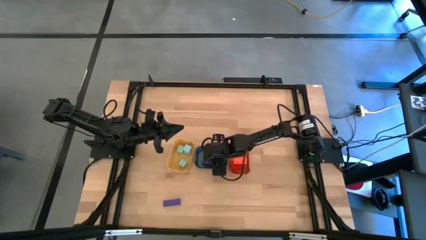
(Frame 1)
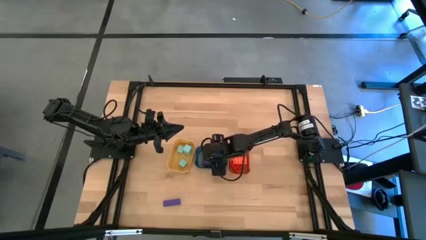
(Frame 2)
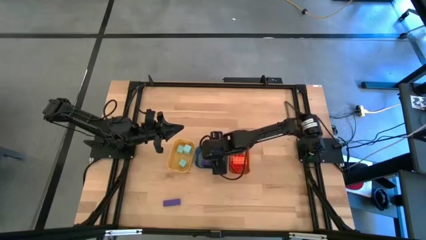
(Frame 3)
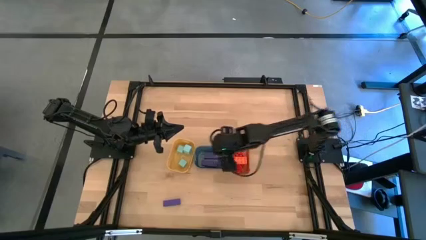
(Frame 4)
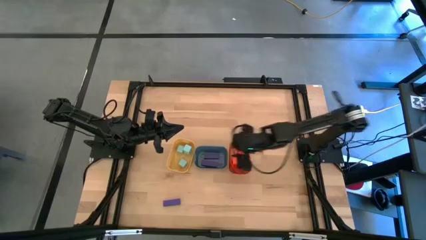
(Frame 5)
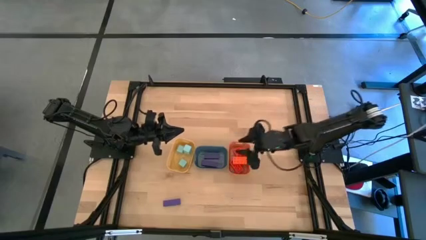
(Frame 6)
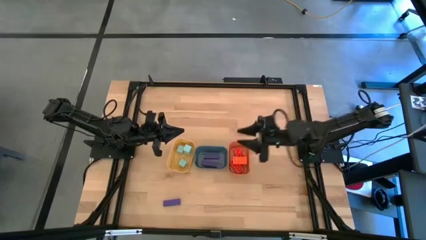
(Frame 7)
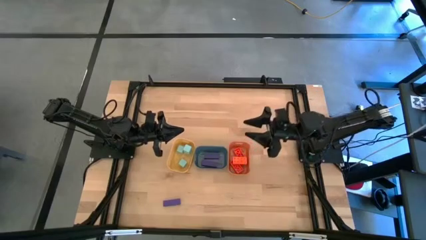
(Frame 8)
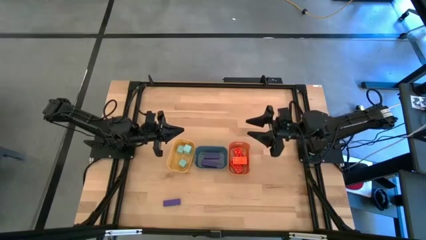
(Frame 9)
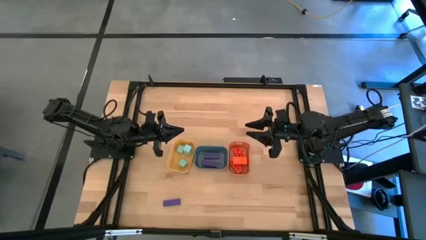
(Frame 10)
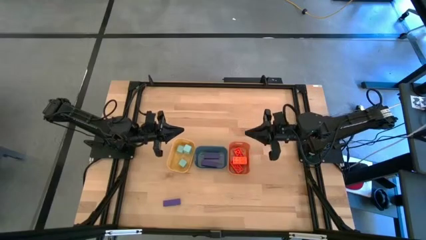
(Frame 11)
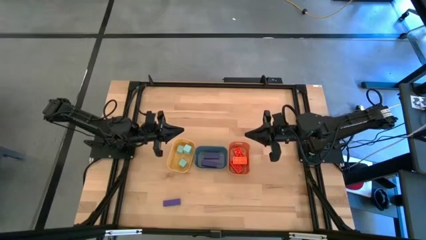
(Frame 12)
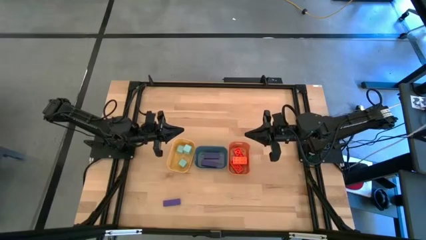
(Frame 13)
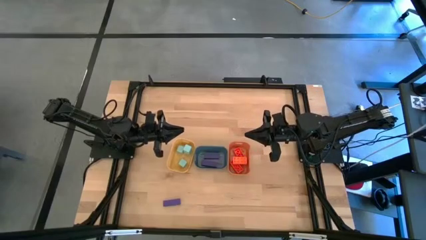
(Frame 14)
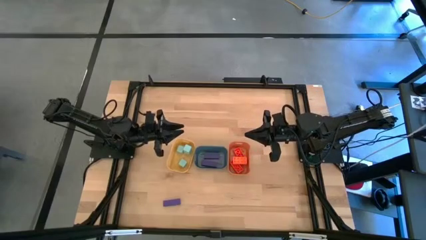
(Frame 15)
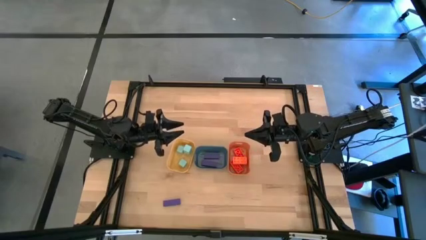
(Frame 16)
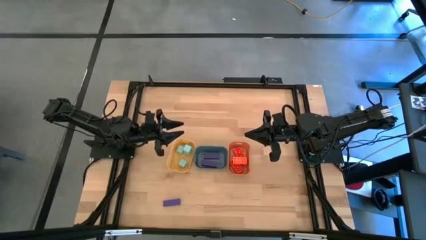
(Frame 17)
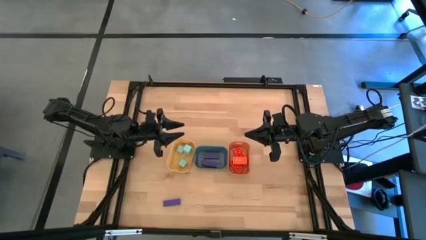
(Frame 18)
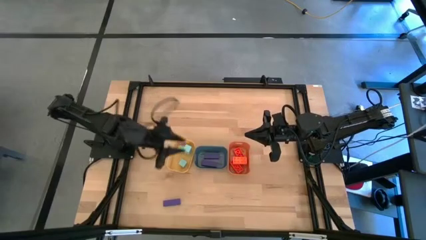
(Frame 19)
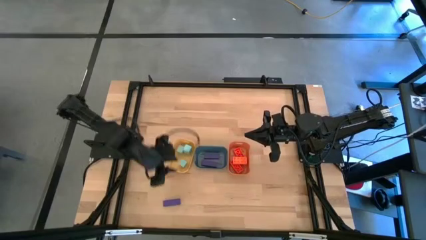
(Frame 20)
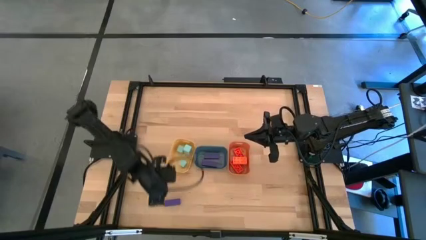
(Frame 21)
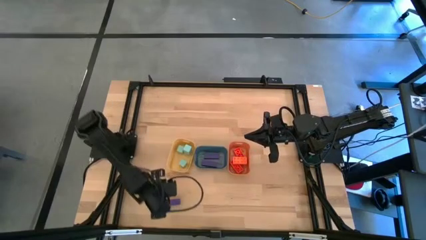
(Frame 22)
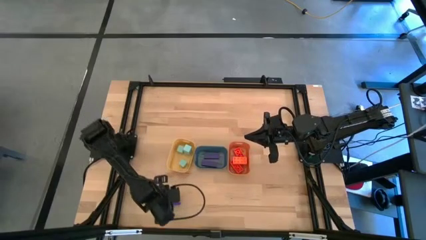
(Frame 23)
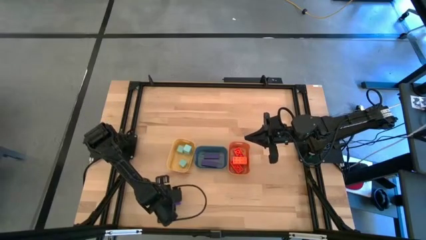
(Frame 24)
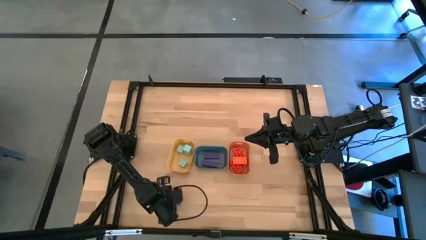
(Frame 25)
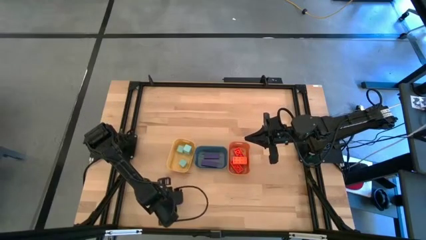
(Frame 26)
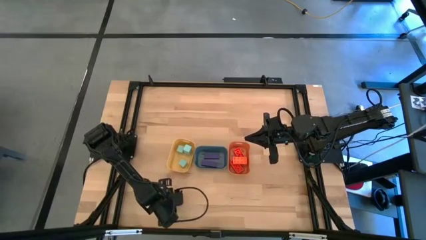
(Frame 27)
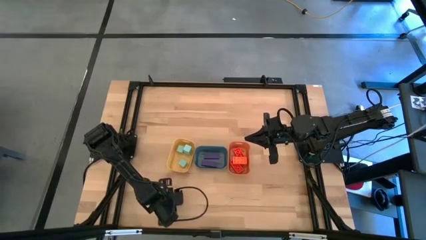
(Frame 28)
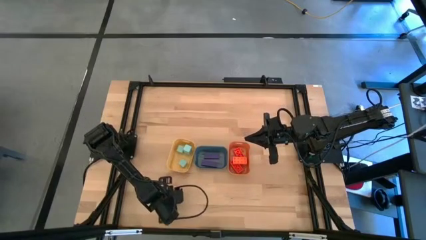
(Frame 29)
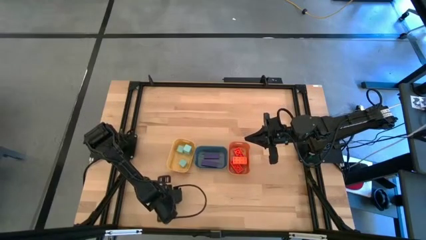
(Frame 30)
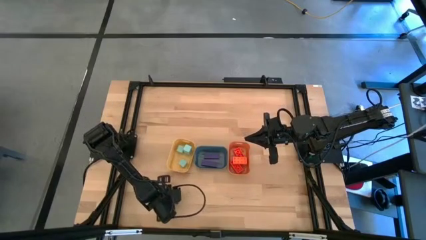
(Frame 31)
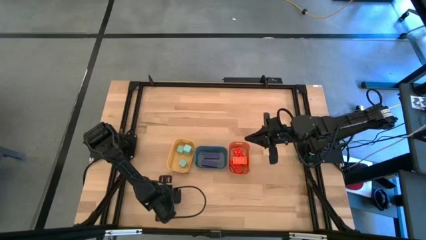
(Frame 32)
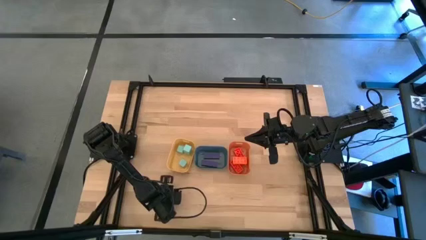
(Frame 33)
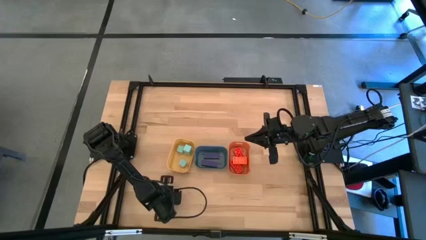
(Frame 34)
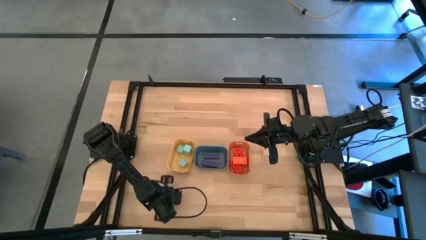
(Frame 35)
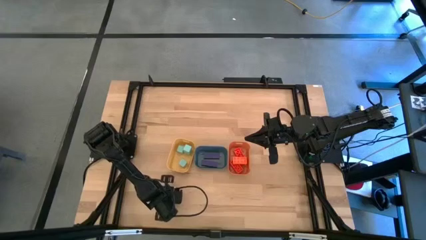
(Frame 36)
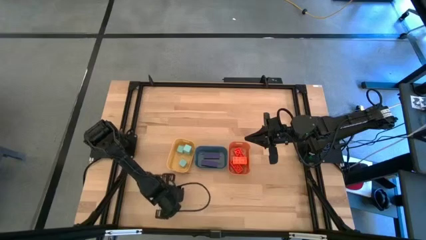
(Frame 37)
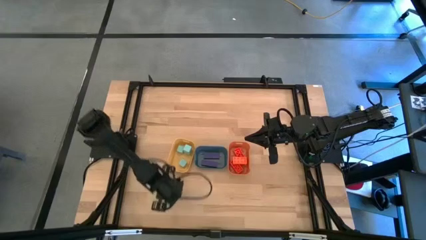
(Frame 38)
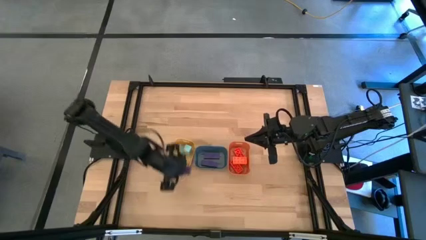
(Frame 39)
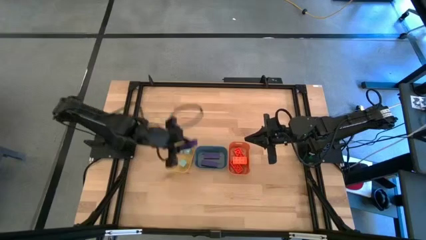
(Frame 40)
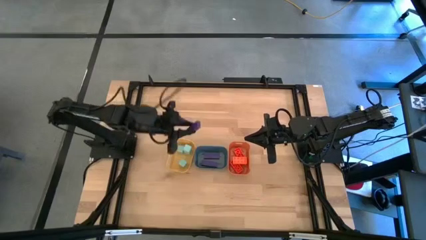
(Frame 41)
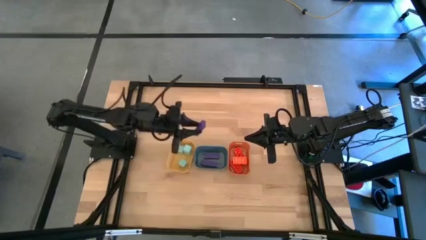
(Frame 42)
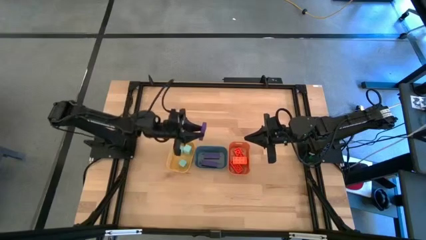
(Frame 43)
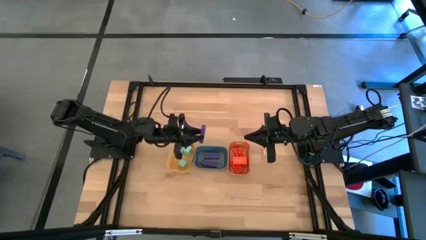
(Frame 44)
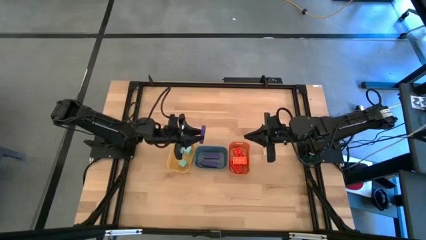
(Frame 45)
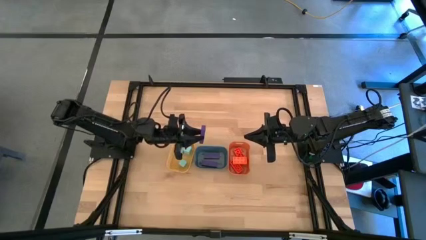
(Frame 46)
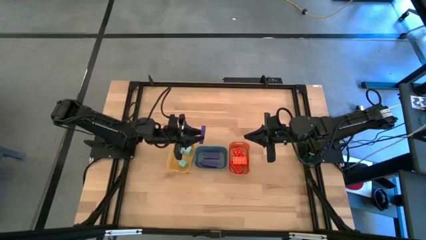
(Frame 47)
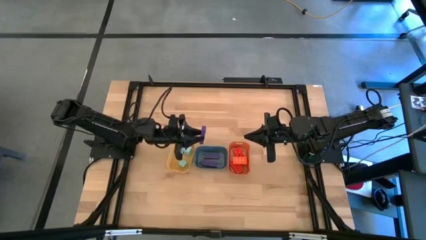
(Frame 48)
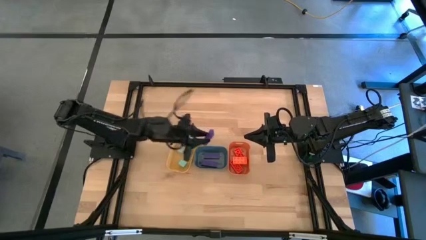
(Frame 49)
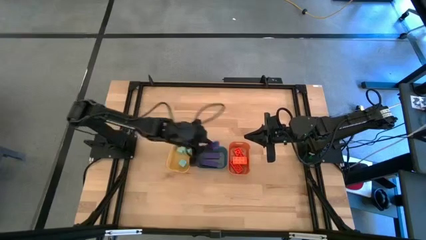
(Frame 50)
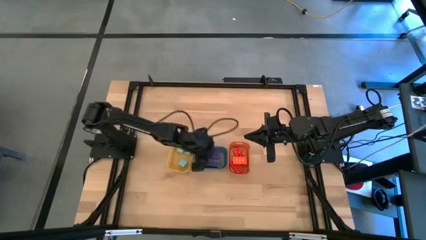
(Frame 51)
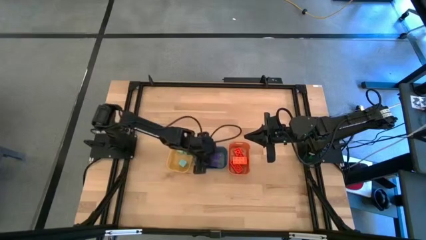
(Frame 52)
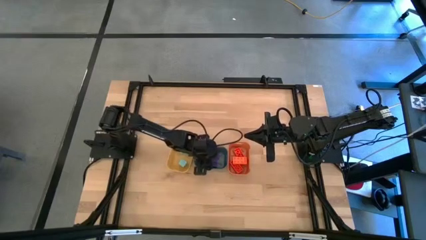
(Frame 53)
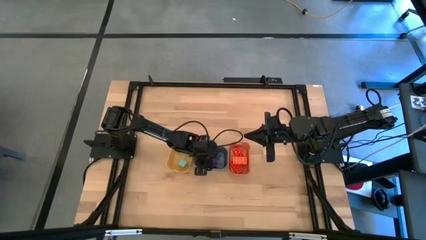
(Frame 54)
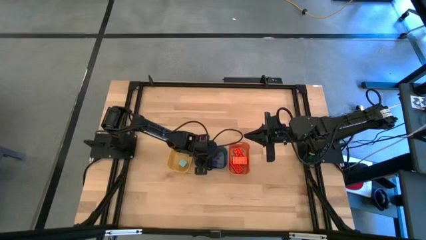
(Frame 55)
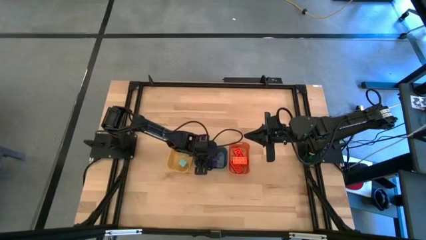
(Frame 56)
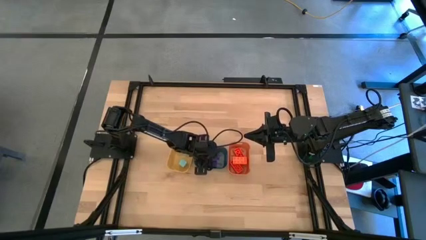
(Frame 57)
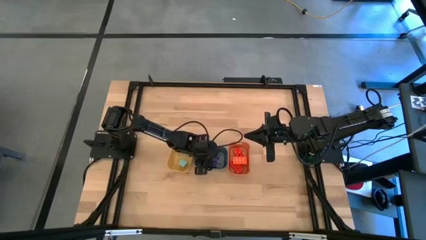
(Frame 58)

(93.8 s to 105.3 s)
Task: Sort & place blocks by color
Put the violet block into the blue bin

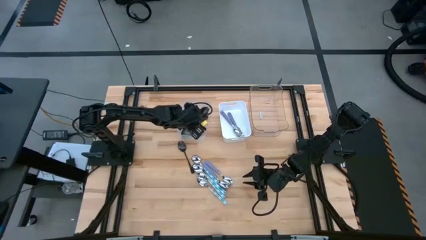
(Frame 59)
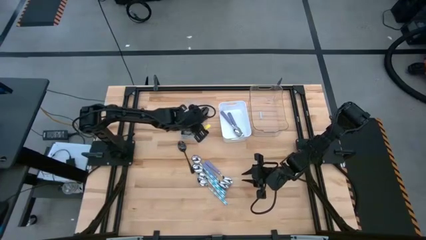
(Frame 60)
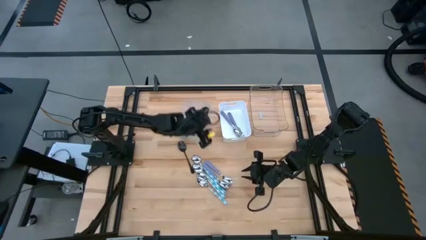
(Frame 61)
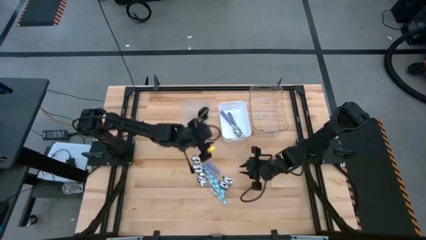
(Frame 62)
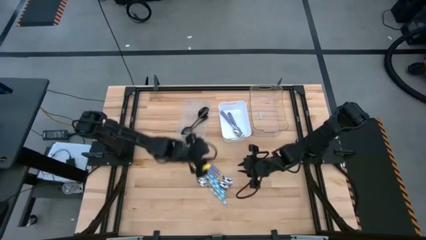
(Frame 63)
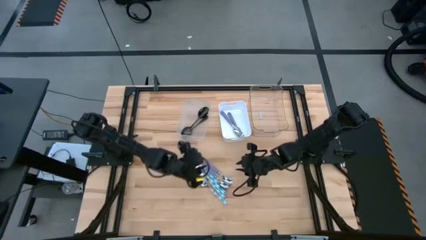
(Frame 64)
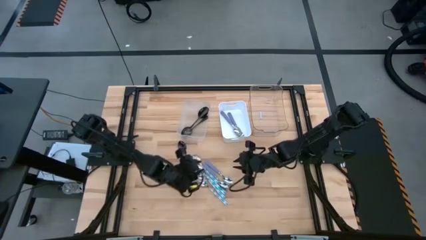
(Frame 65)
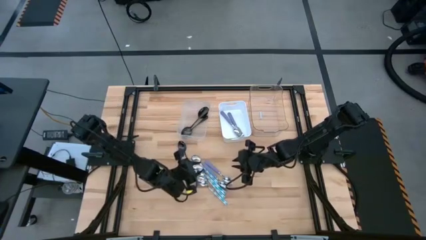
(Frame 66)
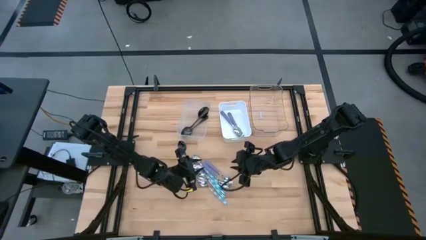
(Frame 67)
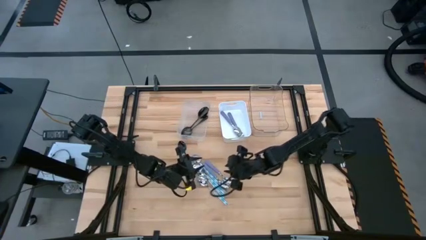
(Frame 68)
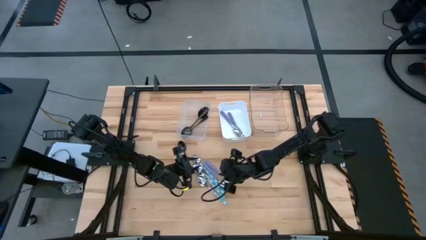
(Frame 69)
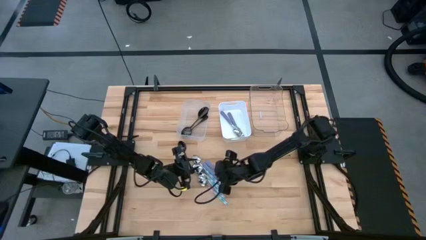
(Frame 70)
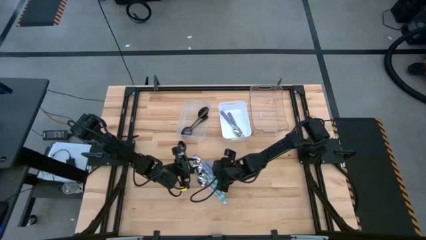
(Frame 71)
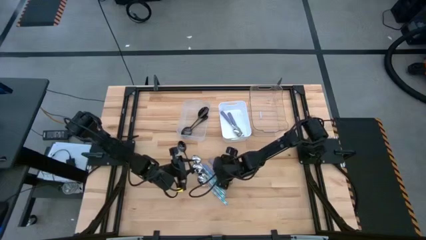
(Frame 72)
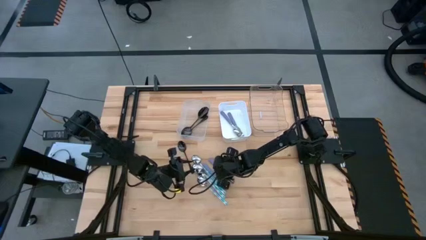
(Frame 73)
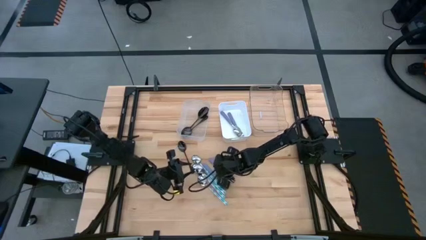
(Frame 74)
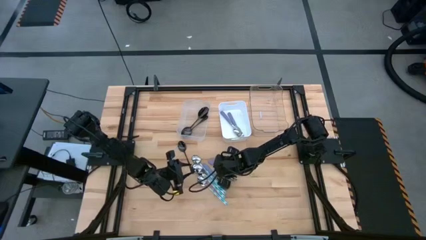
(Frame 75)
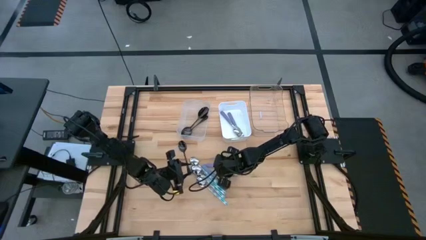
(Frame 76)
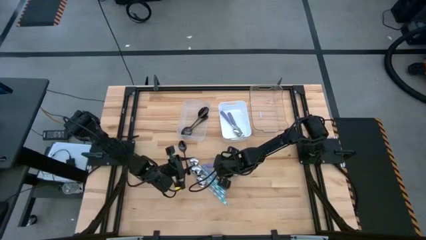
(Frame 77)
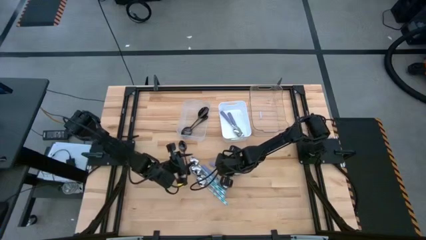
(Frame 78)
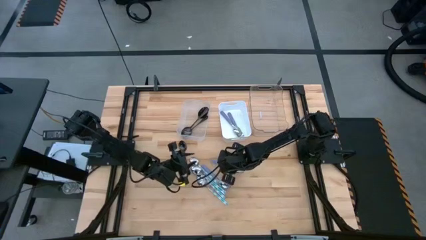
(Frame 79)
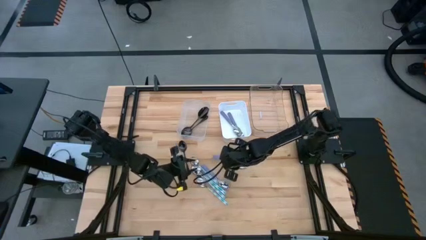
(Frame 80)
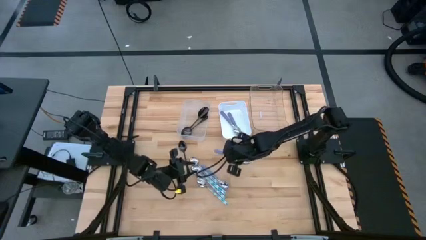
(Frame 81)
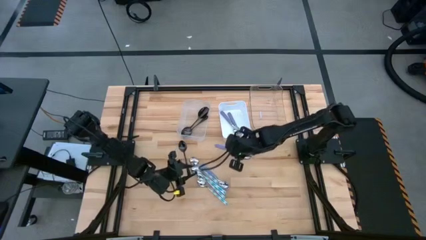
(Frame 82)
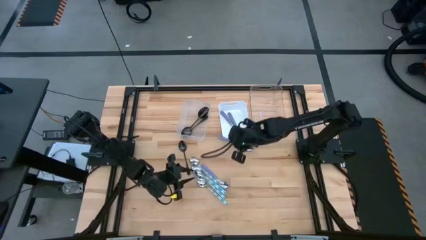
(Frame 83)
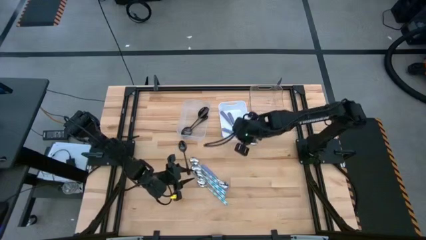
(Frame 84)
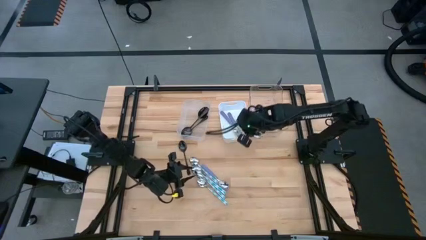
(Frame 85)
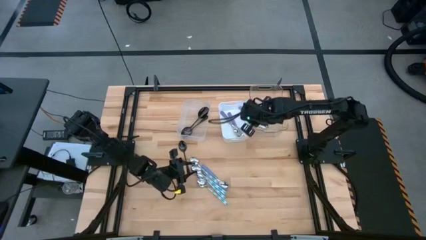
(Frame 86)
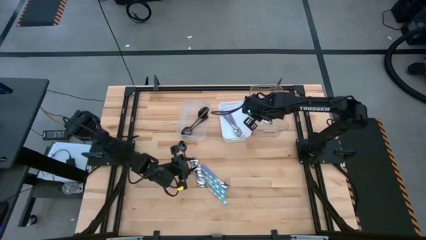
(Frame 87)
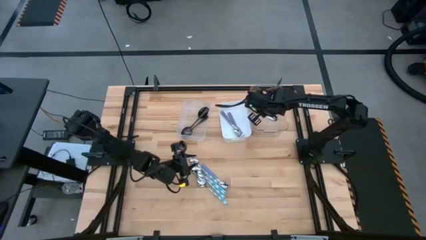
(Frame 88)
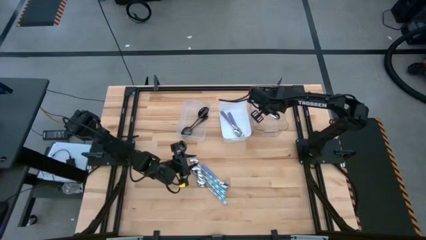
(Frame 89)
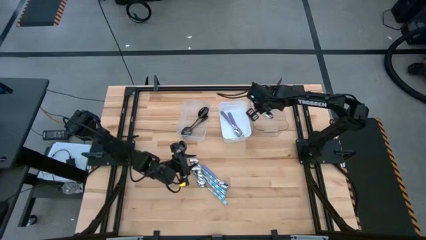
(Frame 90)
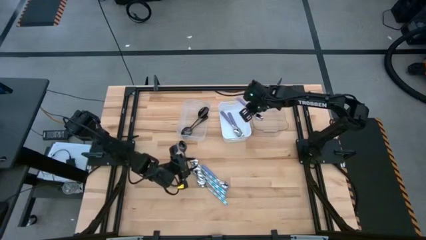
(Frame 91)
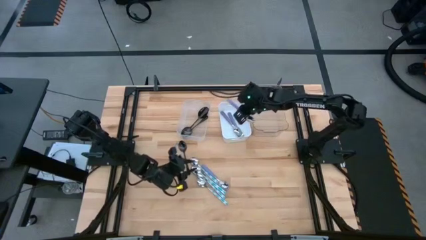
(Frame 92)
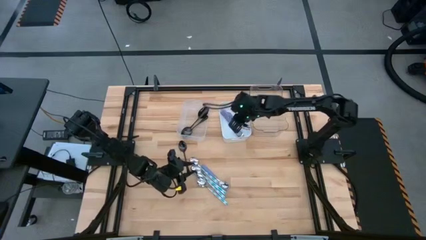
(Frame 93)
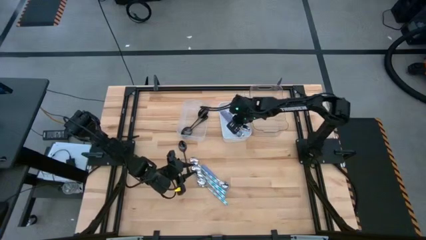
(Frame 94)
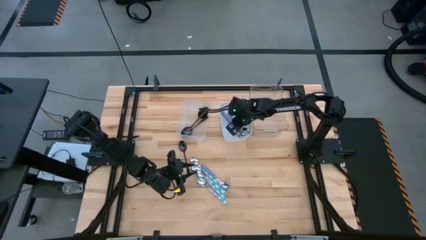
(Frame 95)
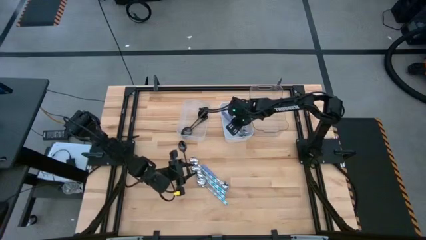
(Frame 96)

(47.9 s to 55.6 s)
Task: Sort silverware by color (type)
Put the violet spoon into the white bin
